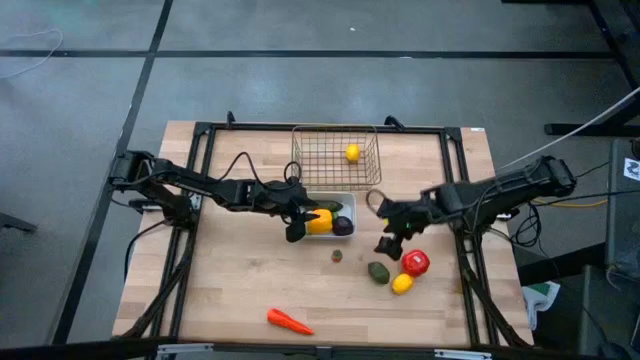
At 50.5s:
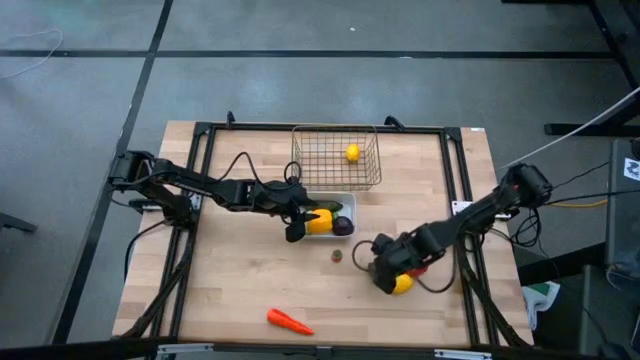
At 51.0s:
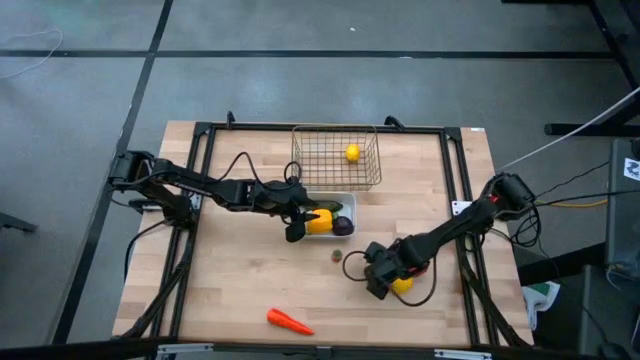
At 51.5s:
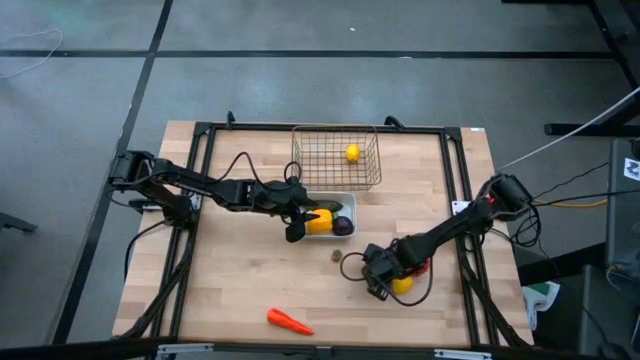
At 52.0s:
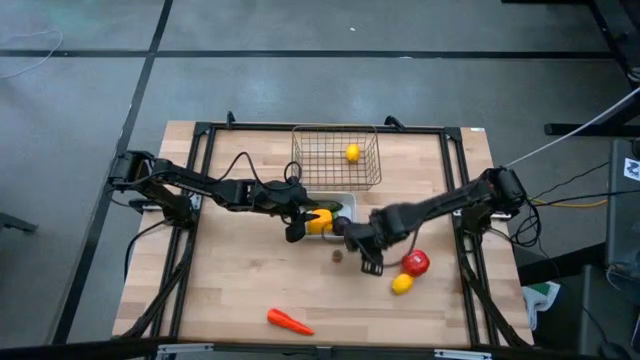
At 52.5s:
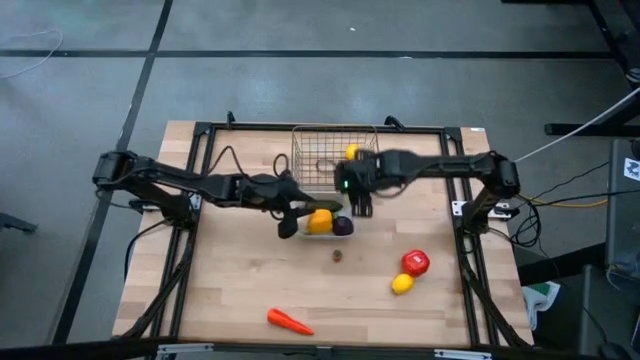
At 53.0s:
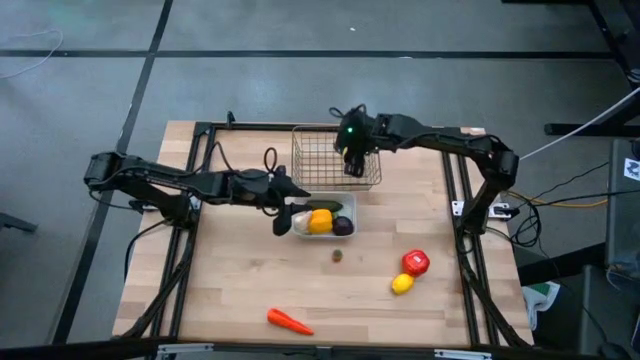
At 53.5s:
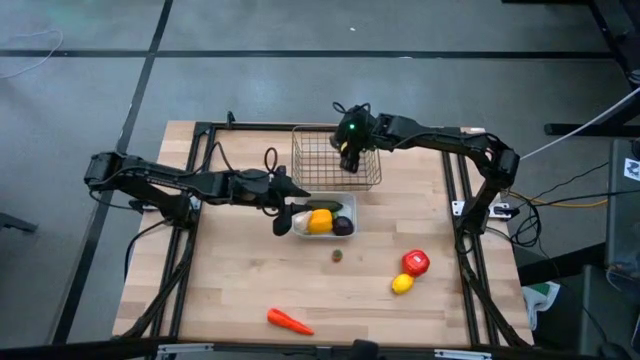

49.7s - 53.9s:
Task: Sort produce into baskets
Put the green lime into the black wire basket

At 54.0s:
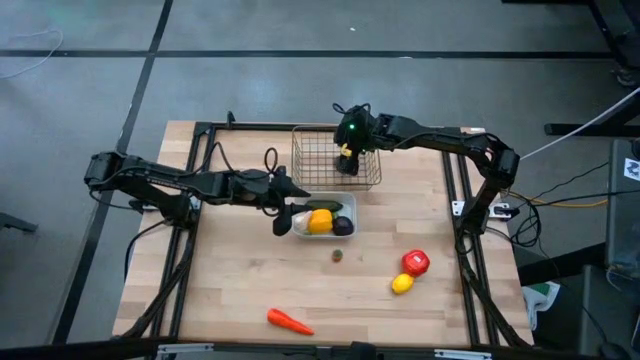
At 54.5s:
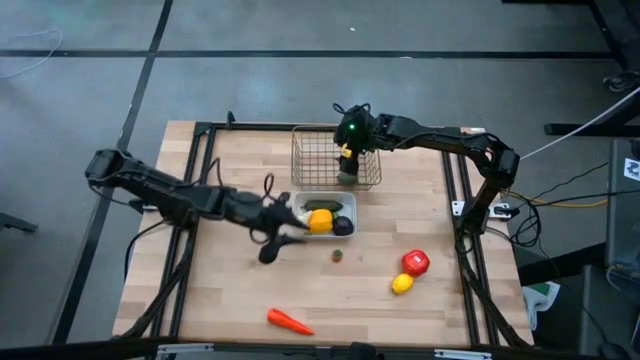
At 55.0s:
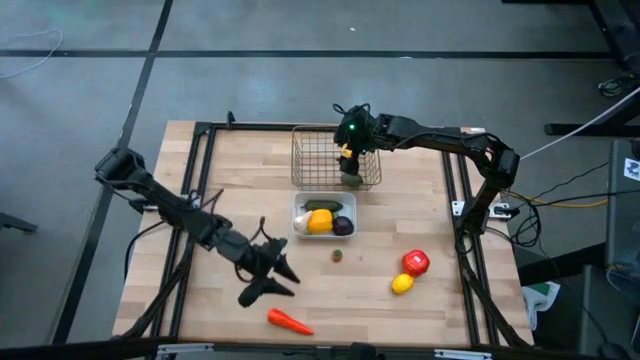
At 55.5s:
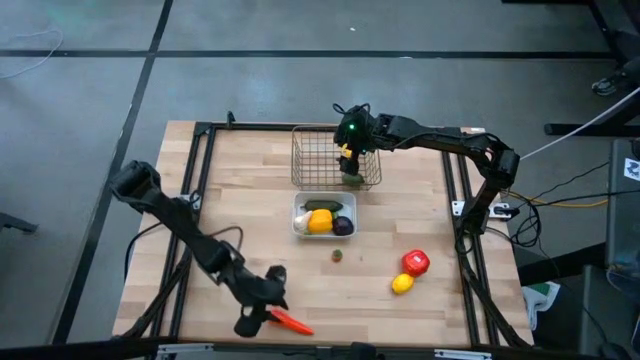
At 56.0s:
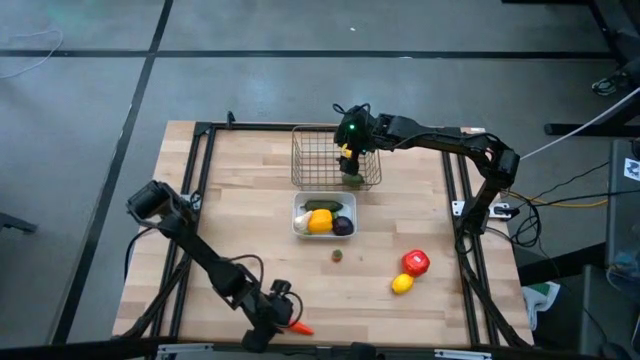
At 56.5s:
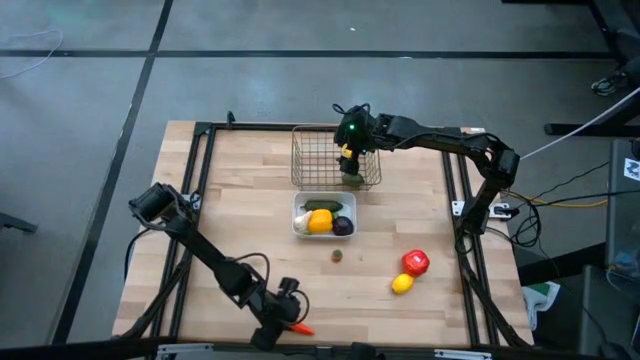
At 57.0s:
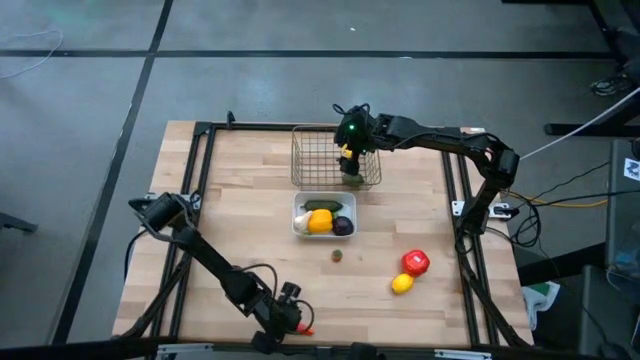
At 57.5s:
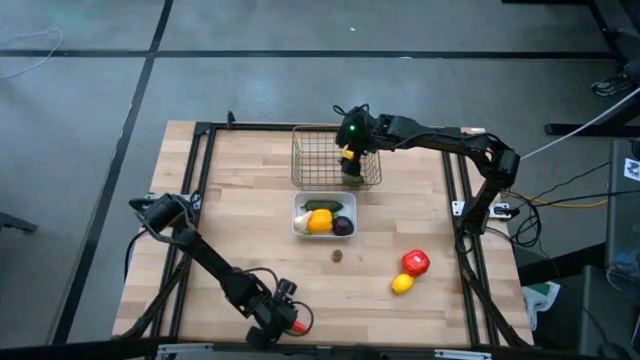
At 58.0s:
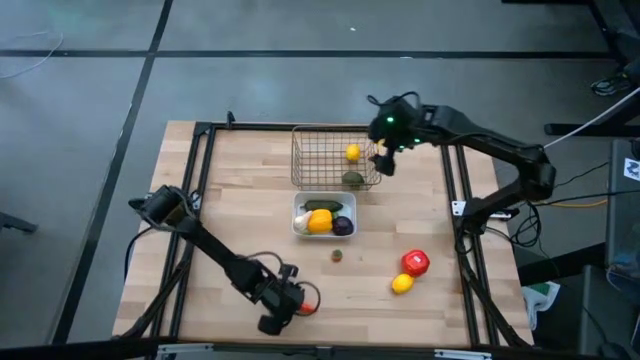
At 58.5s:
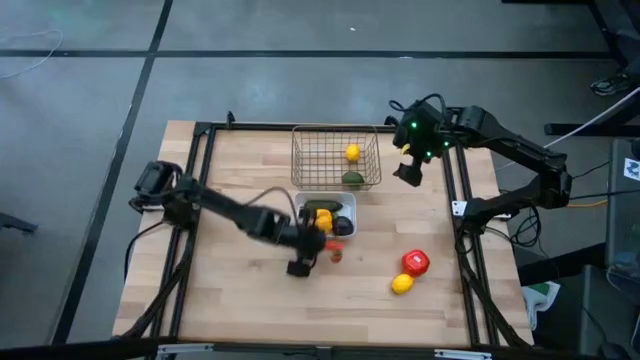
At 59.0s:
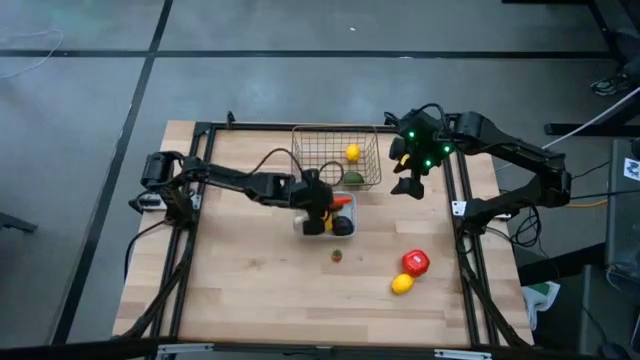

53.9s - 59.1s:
Put the orange carrot into the white bin

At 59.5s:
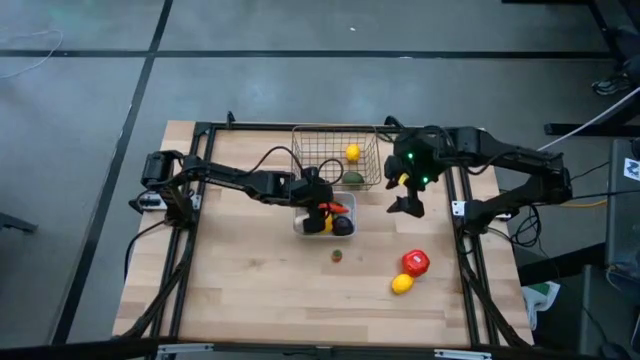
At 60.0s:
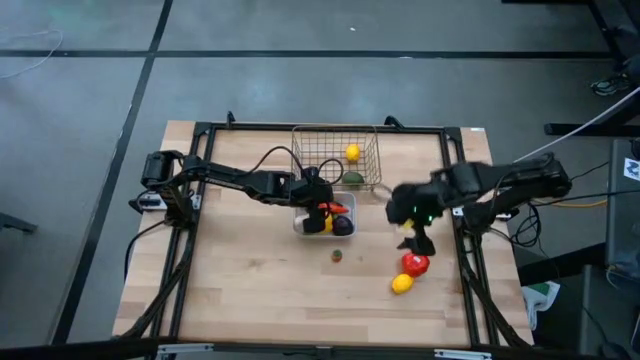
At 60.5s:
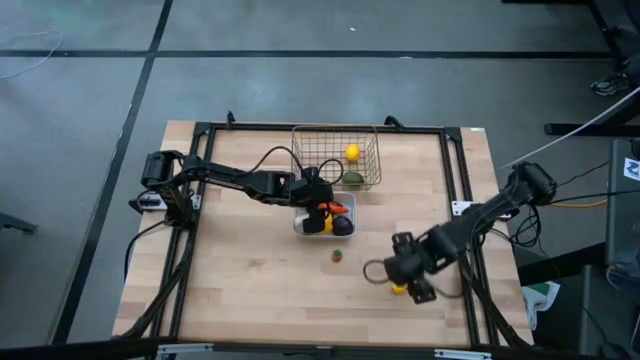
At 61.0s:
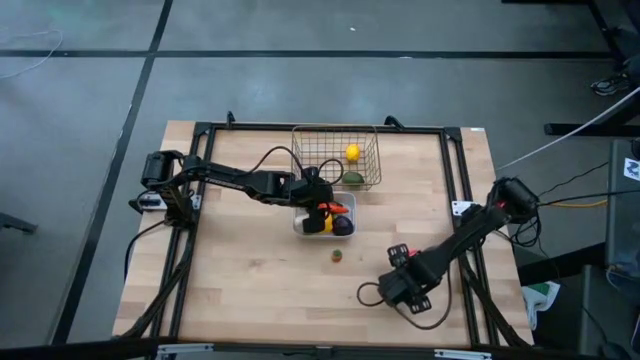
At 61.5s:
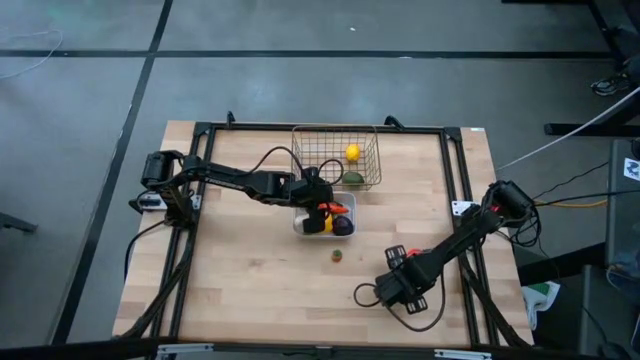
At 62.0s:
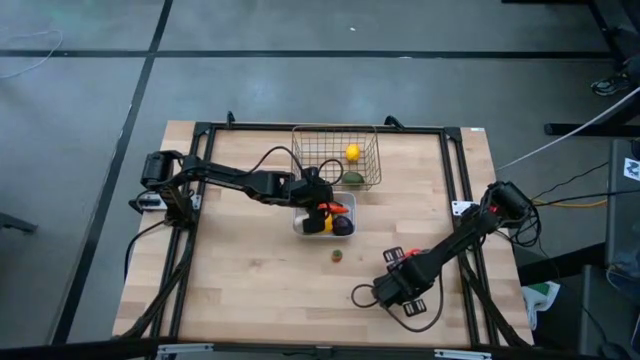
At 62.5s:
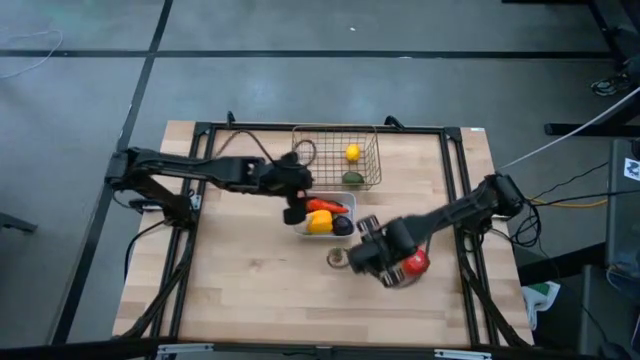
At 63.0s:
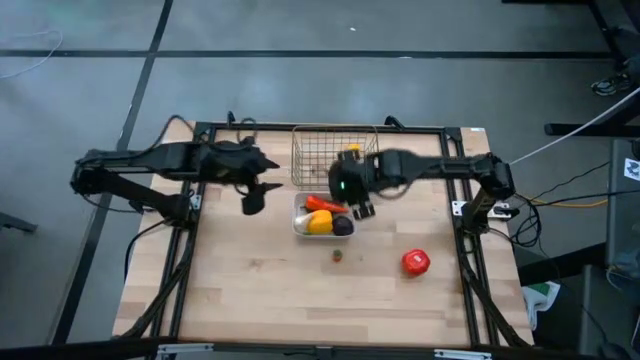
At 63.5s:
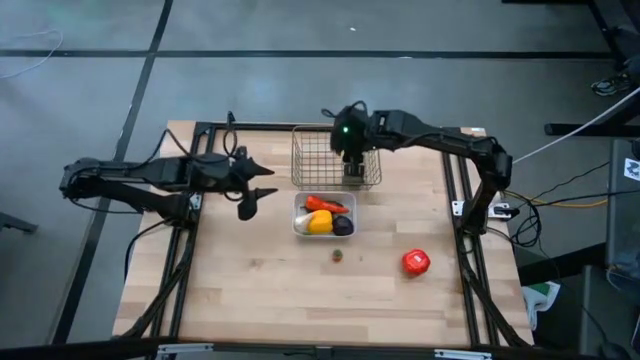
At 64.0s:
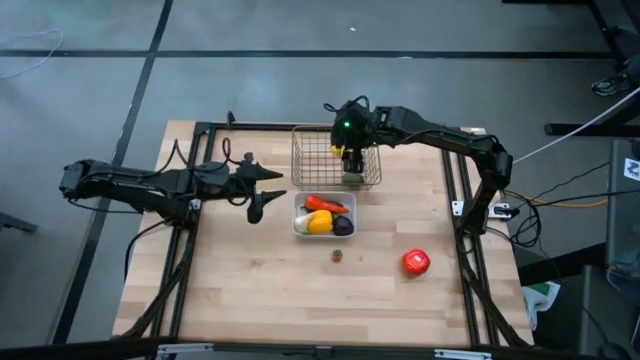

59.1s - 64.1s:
Put the yellow lemon into the black wire basket

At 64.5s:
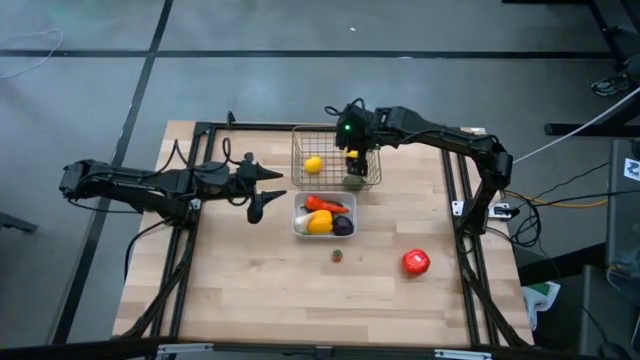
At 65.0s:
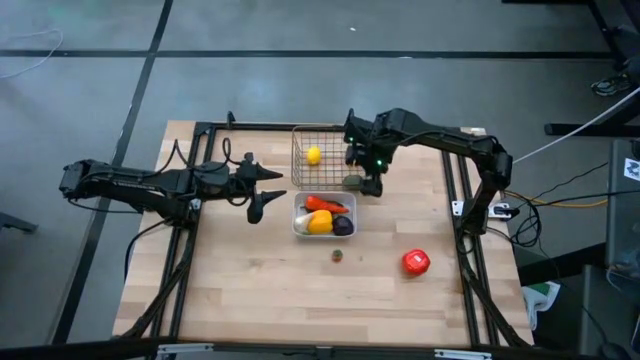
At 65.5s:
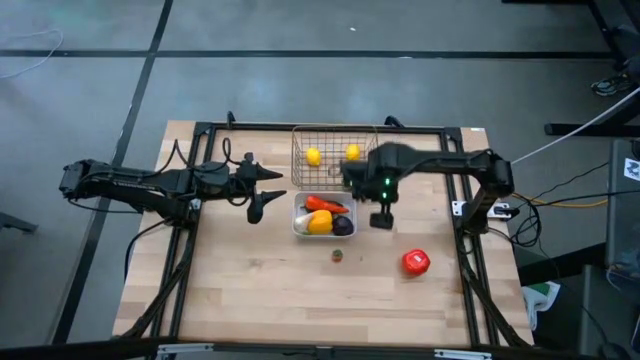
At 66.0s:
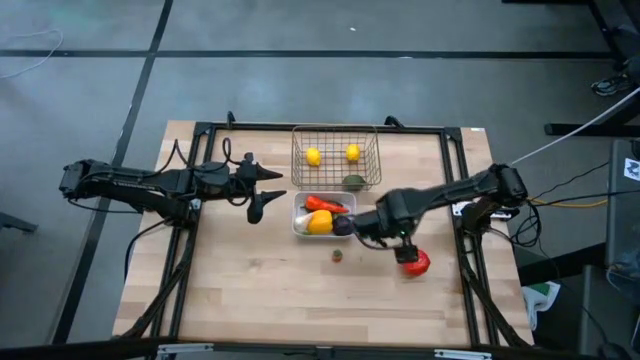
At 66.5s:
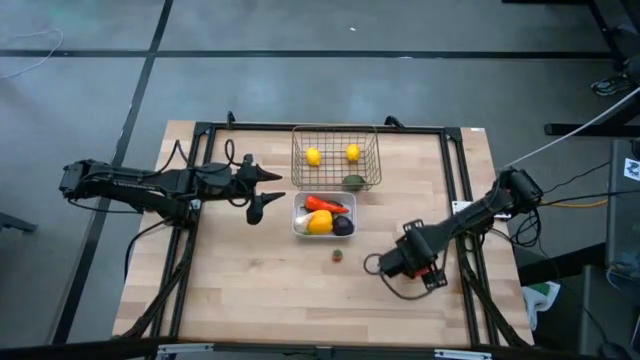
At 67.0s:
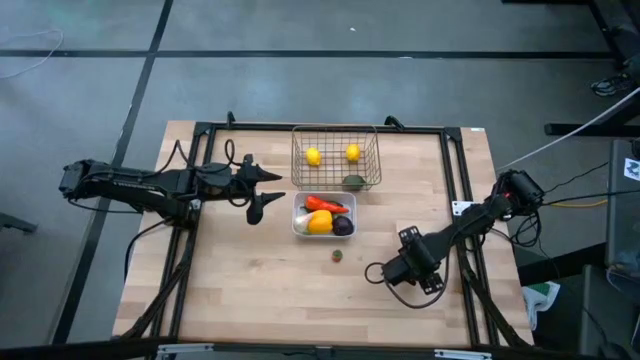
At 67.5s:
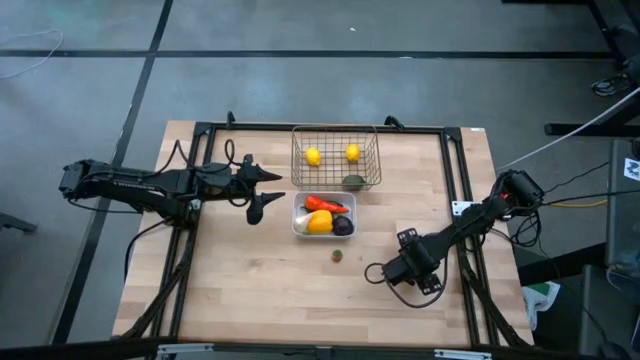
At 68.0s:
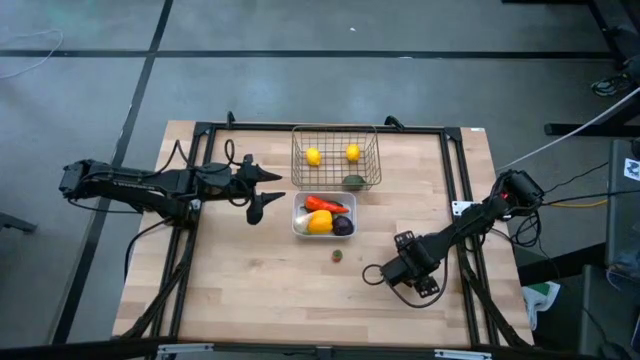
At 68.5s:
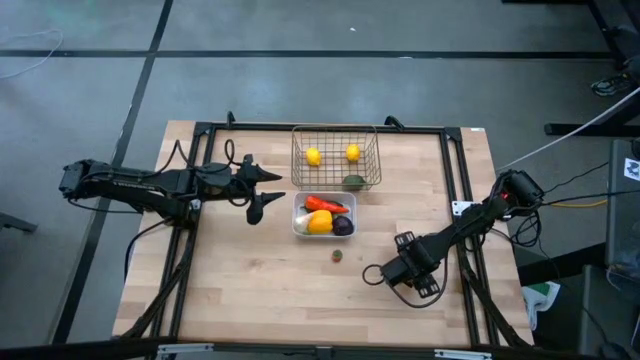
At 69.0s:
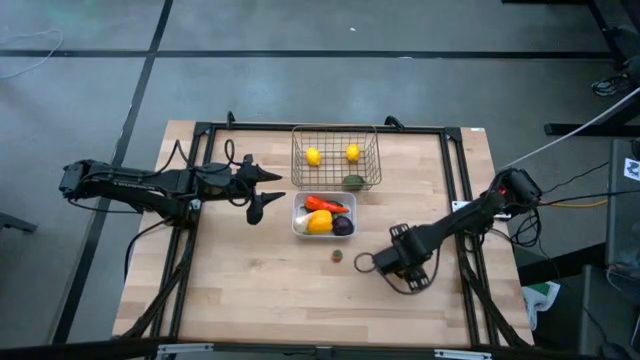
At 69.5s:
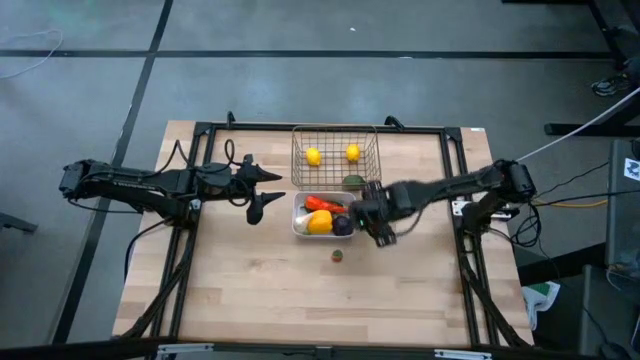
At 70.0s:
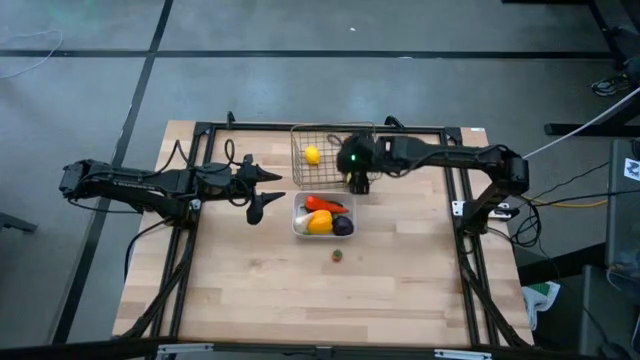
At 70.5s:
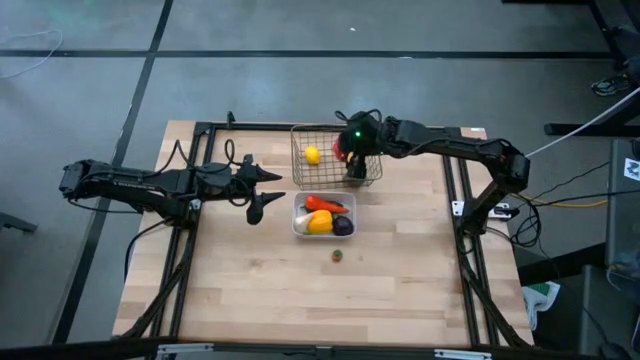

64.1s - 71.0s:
Put the red tomato into the black wire basket
